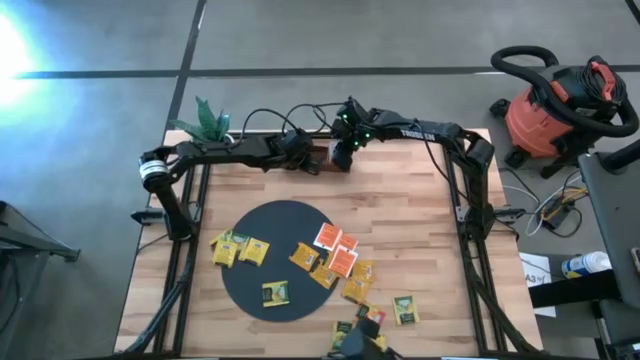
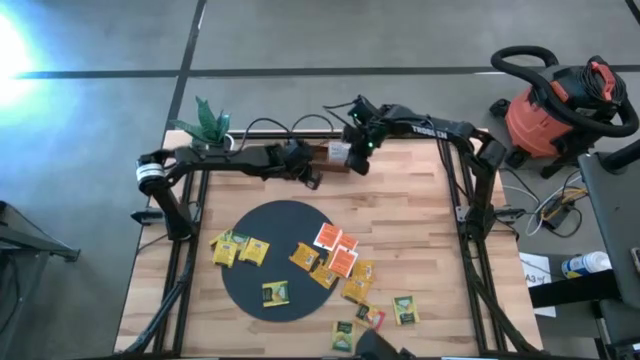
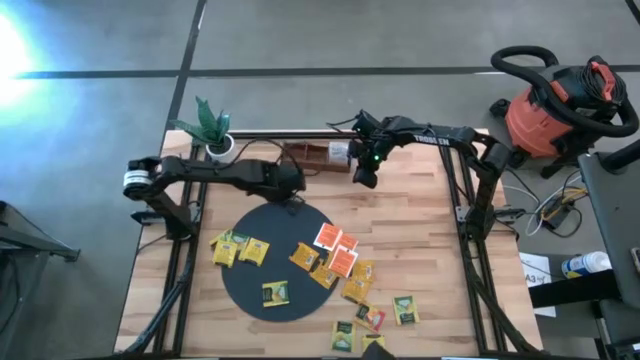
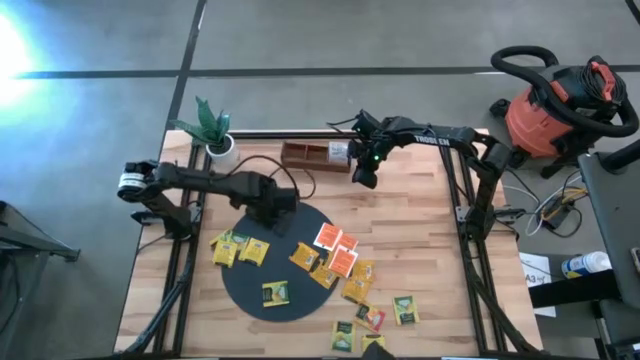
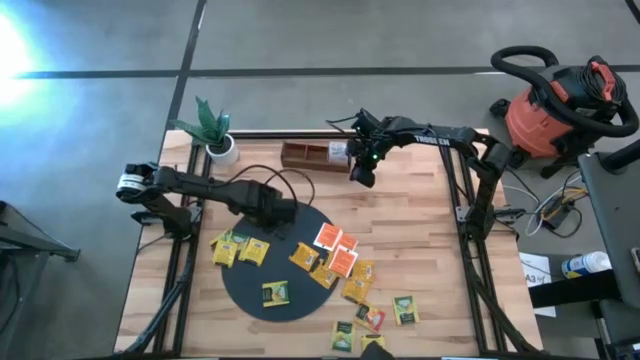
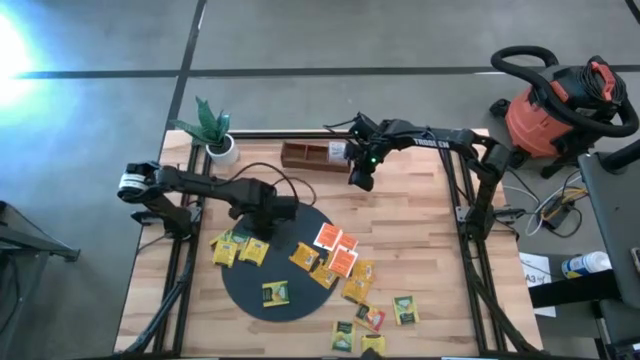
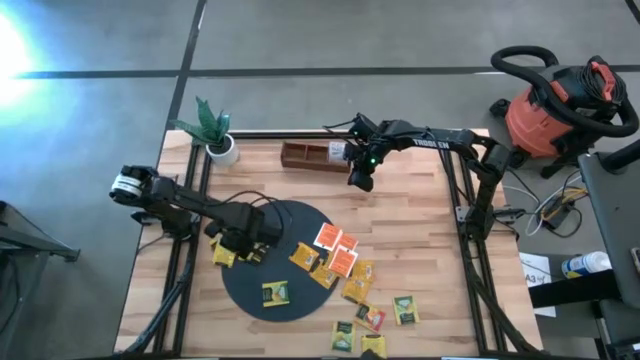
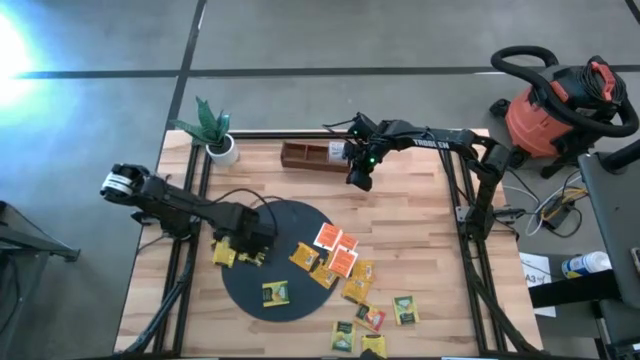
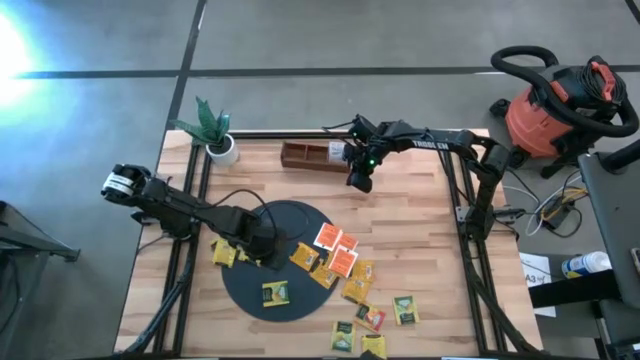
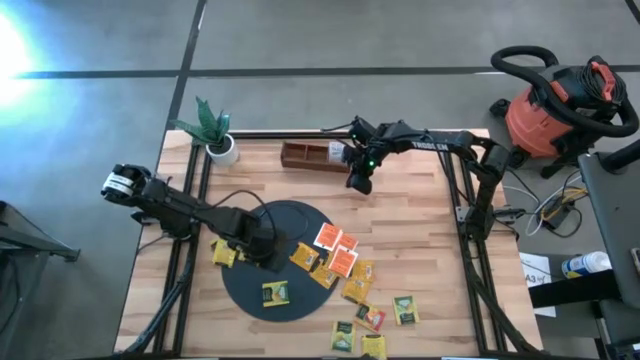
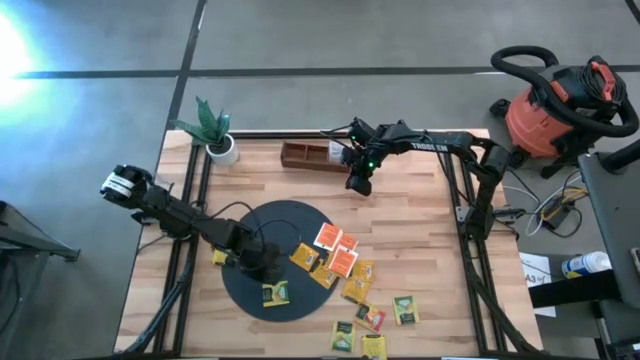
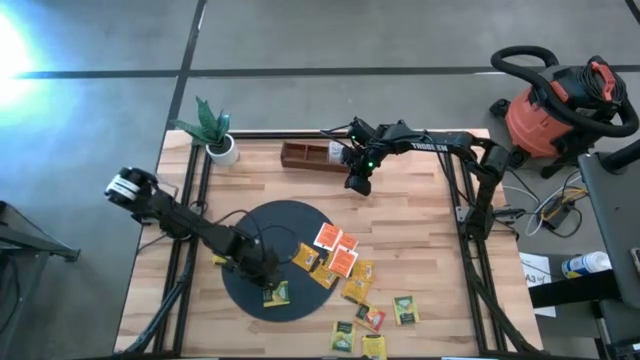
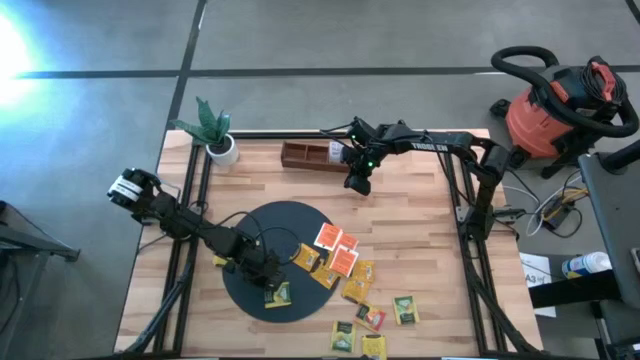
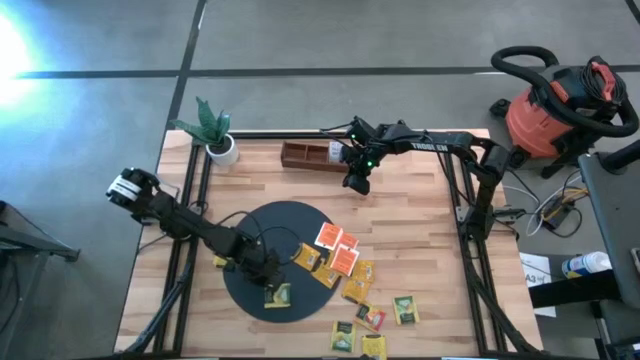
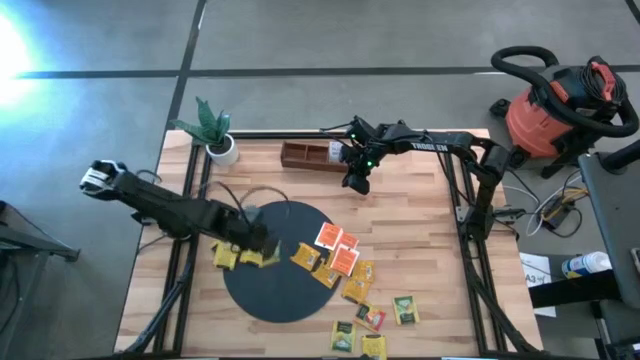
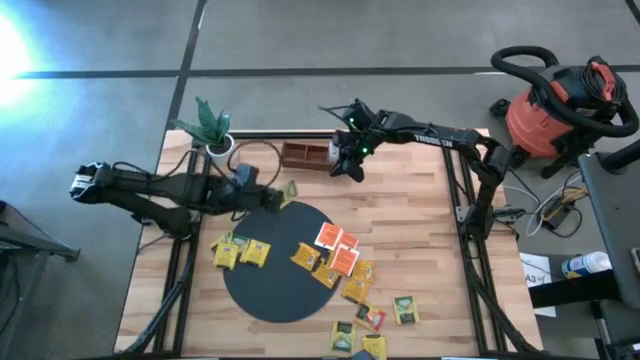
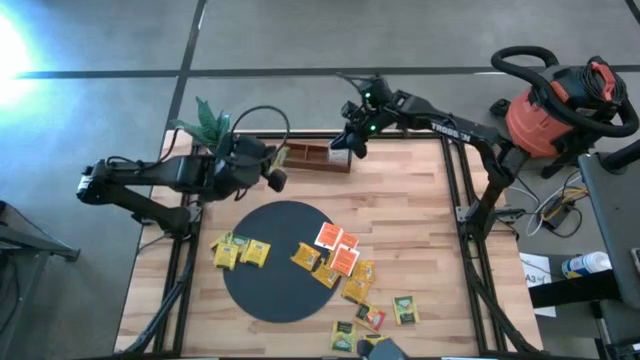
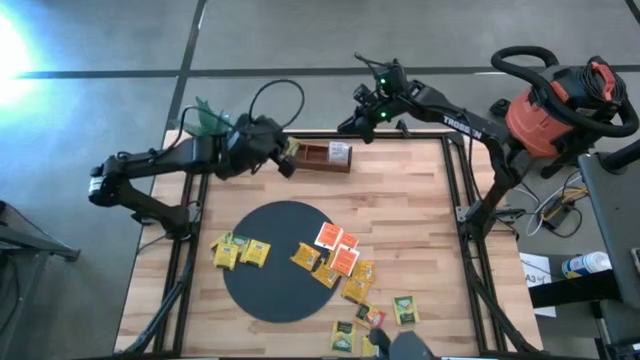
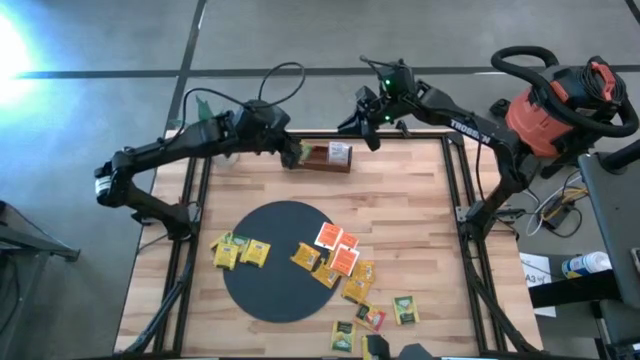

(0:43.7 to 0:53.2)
Task: Pick & Place Tea
Put the yellow tea bag into the middle section of the wooden organizer

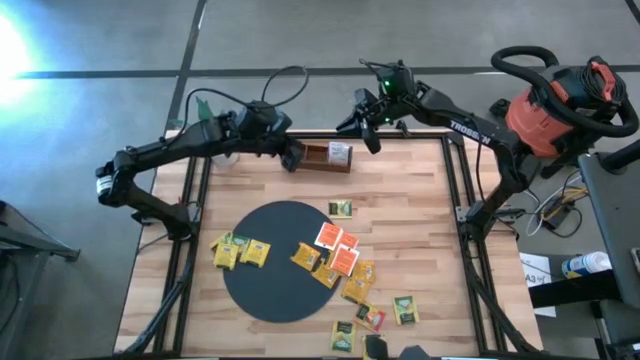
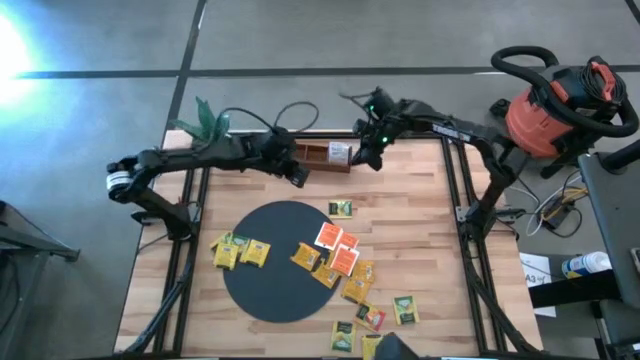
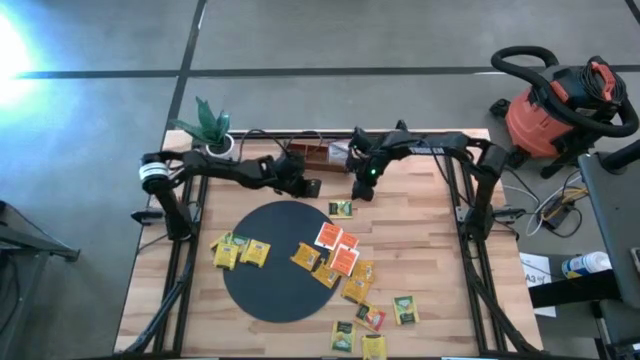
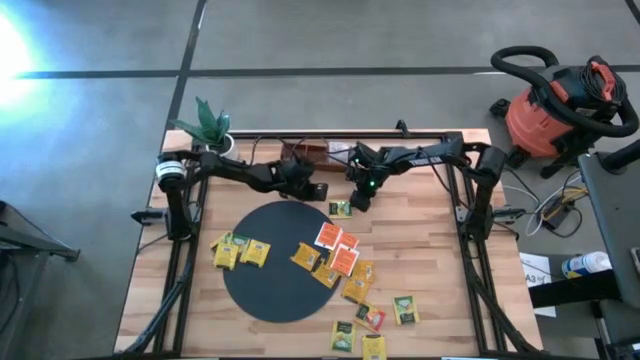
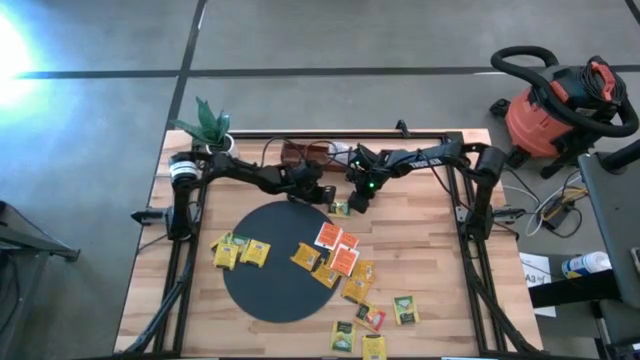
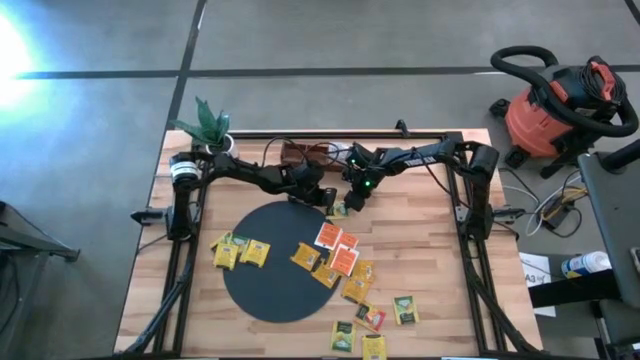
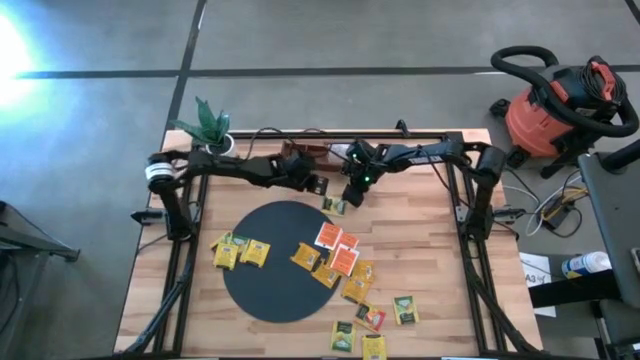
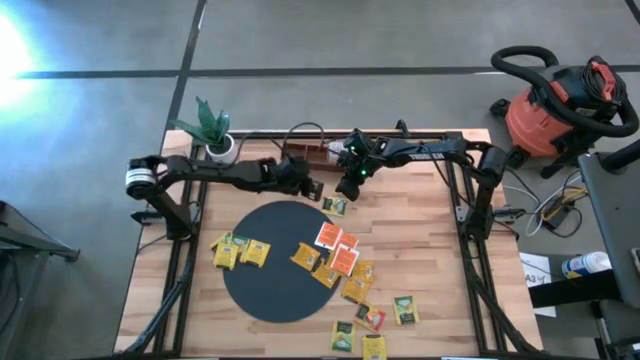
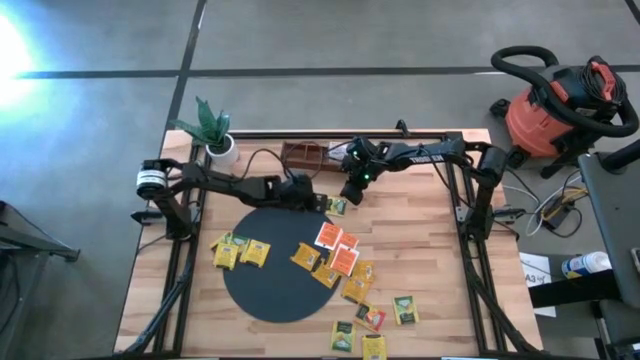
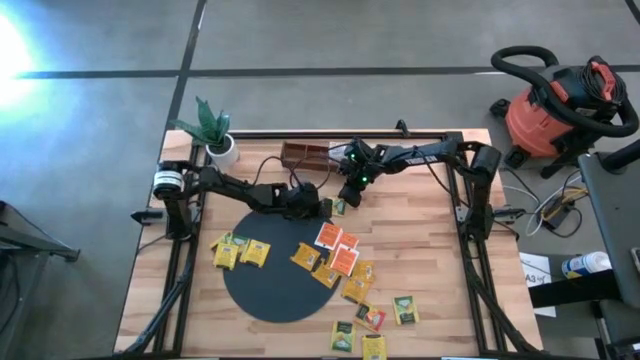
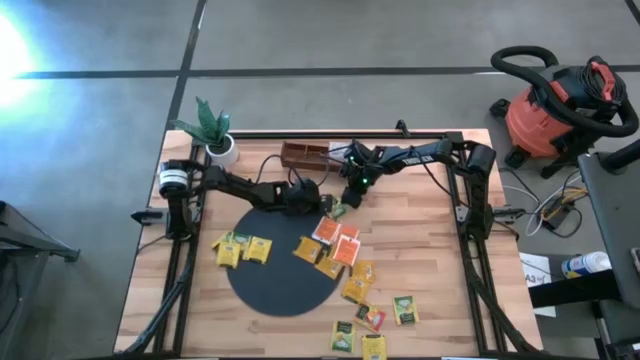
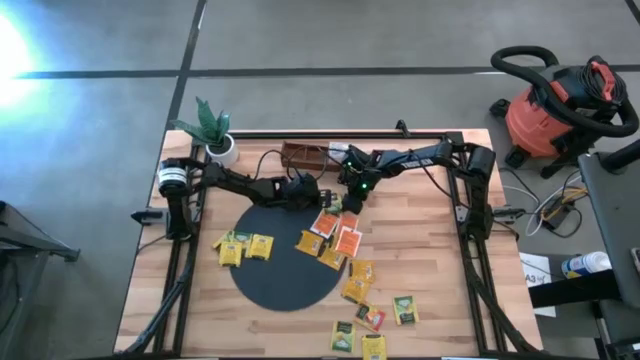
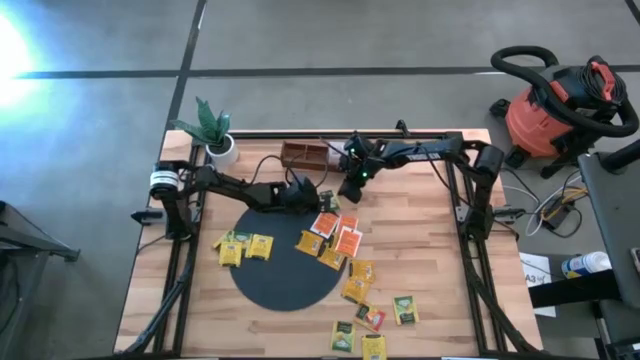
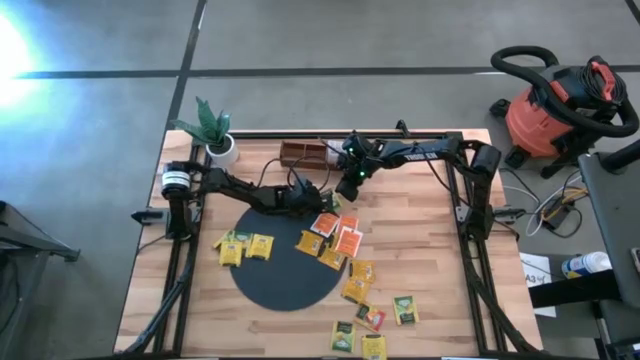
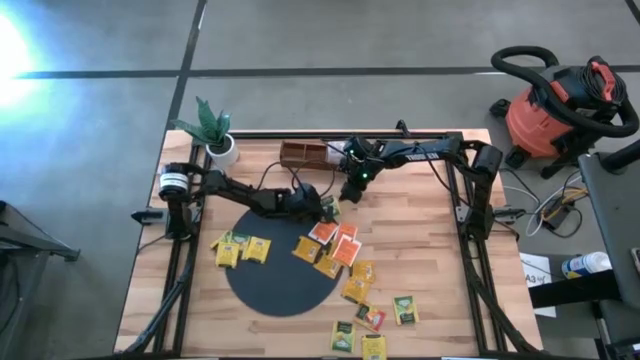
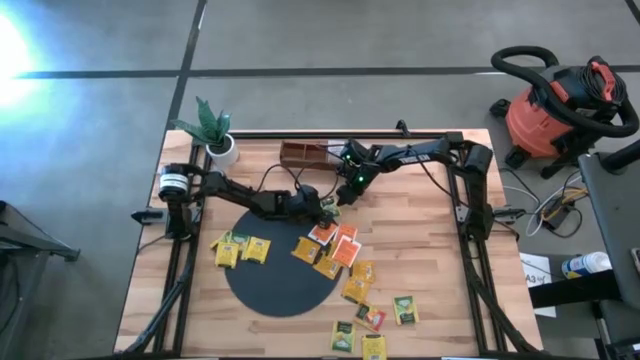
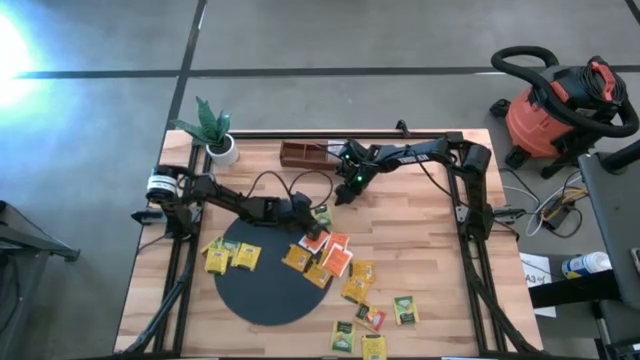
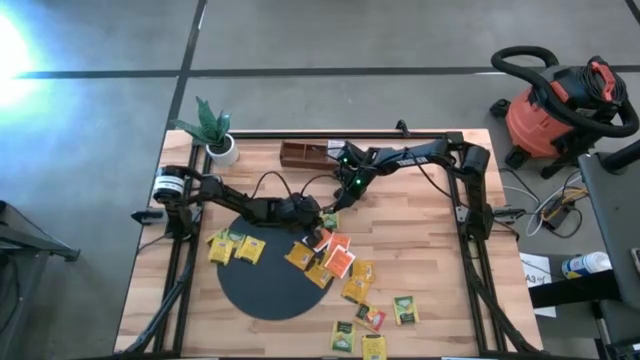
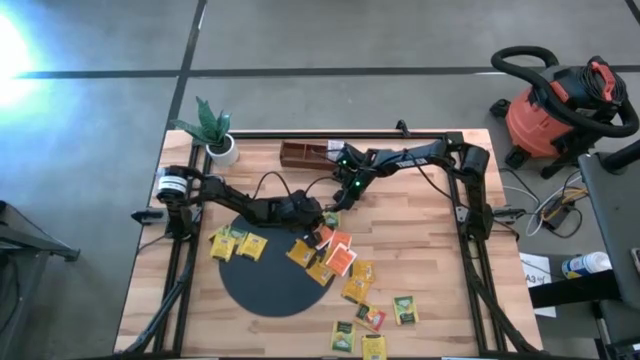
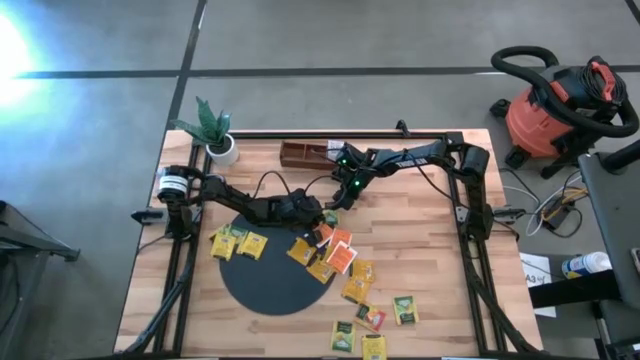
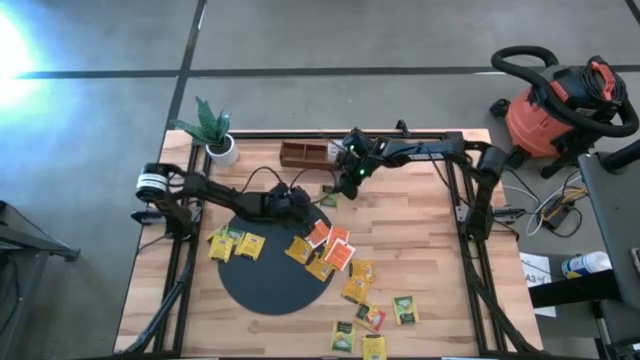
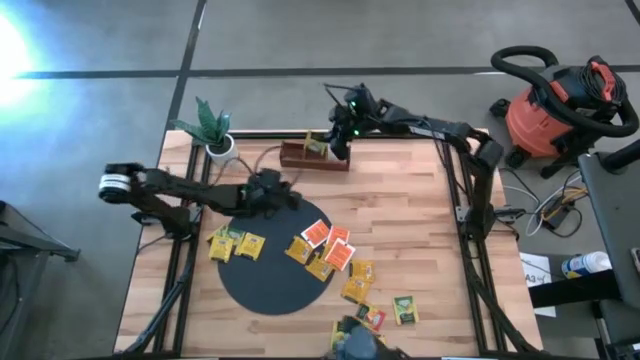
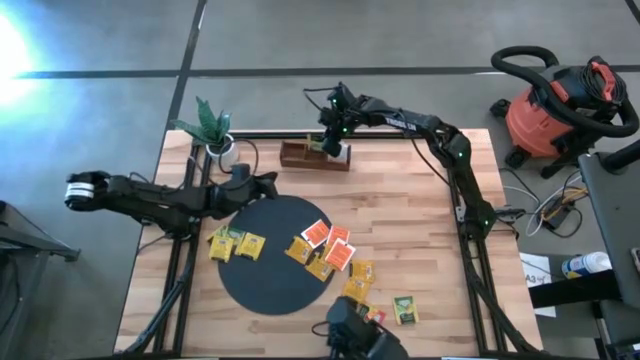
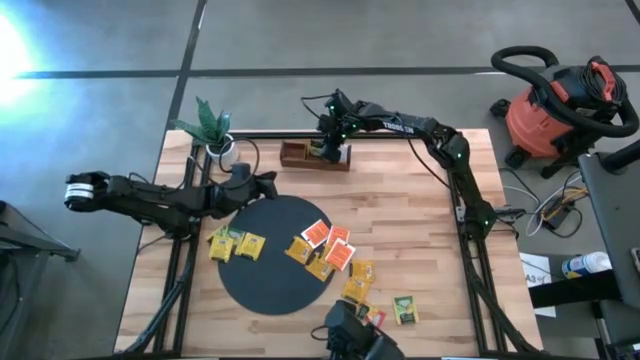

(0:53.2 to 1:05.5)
Put the yellow tea bag into the middle section of the wooden organizer
